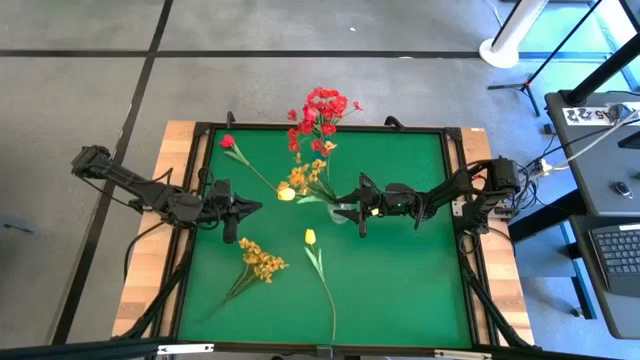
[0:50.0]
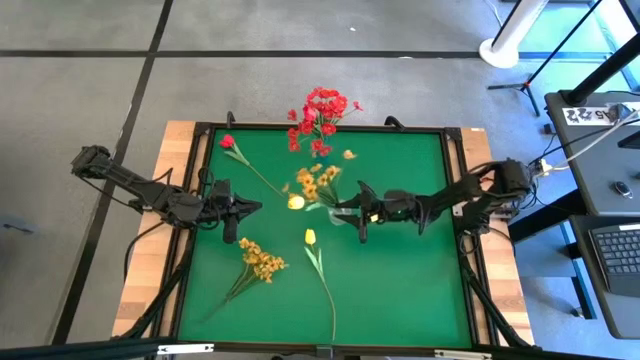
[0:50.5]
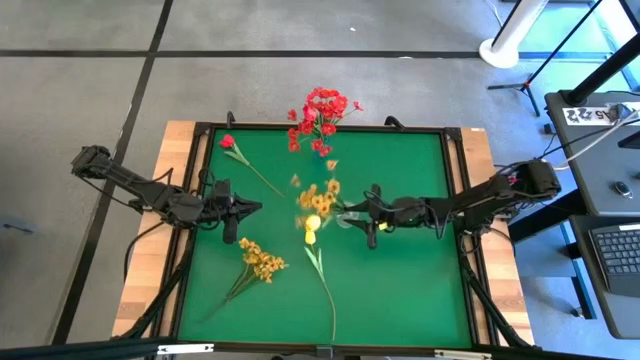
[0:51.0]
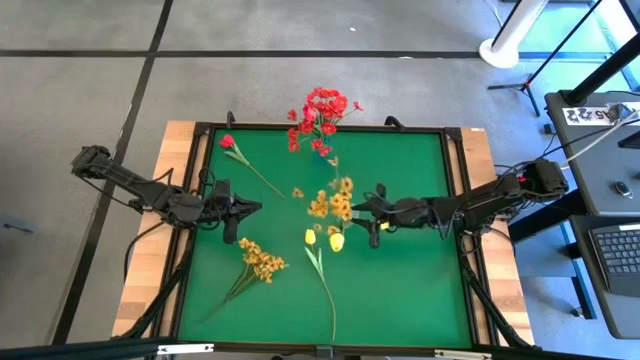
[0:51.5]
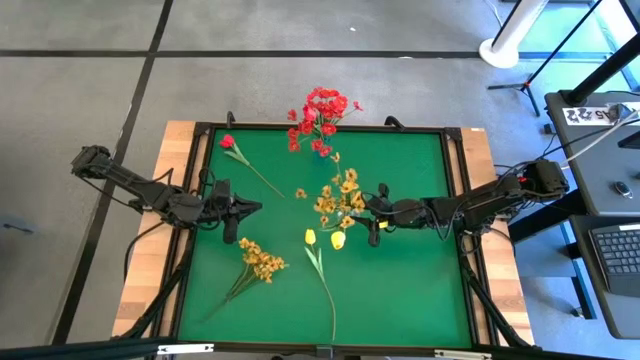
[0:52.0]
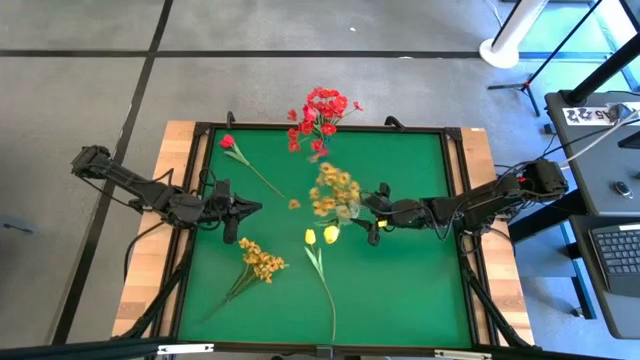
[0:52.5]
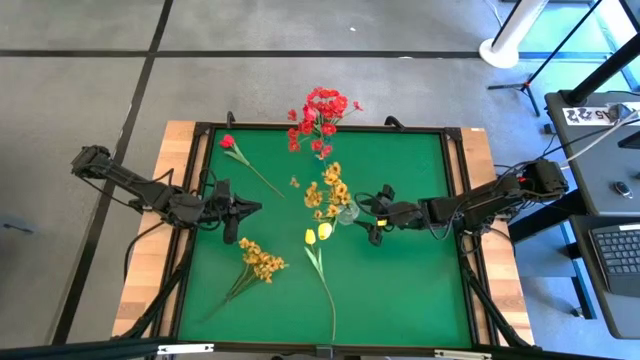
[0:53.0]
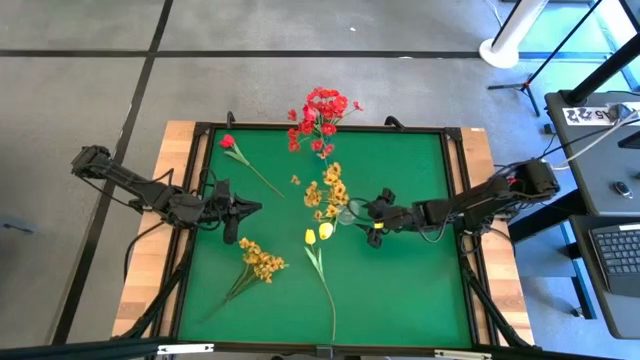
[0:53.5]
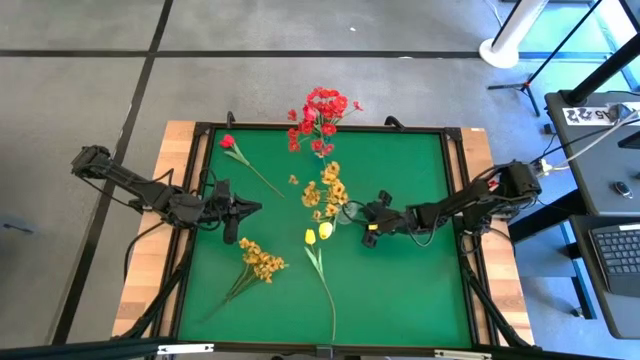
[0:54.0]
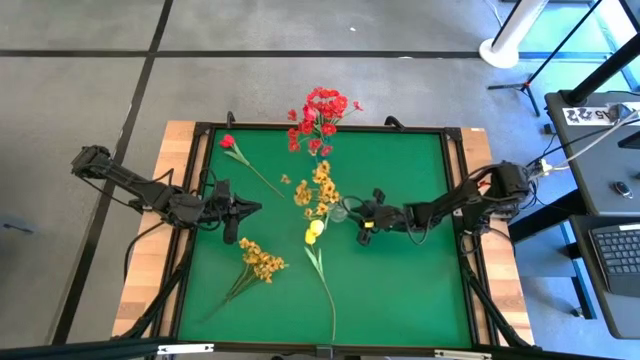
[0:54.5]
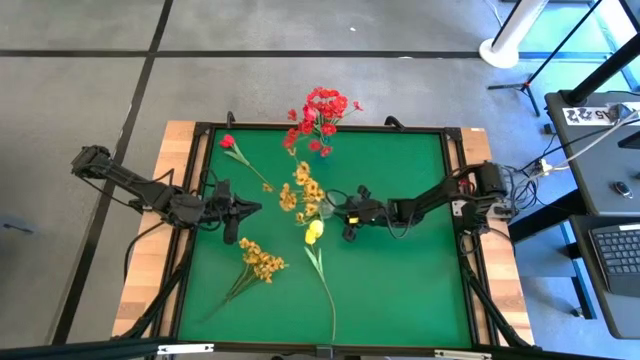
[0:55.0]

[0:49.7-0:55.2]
Task: Sort flowers into vase by color
Adjust the transparent vase

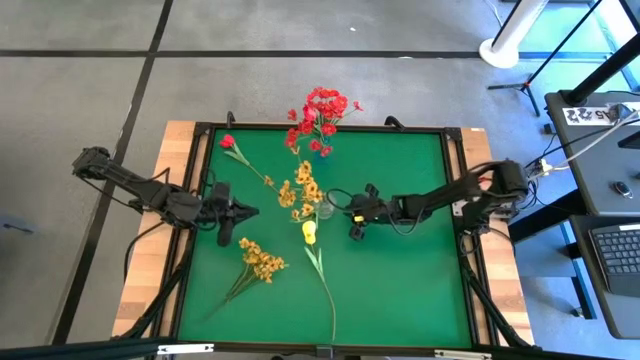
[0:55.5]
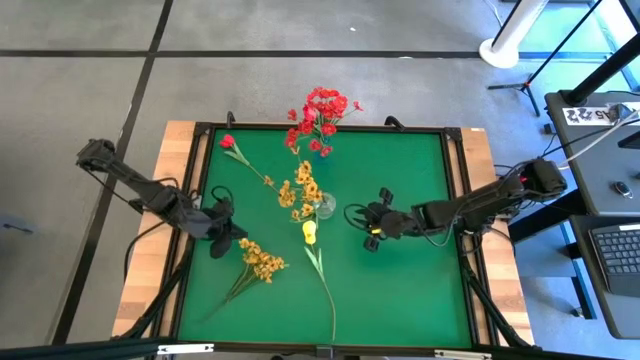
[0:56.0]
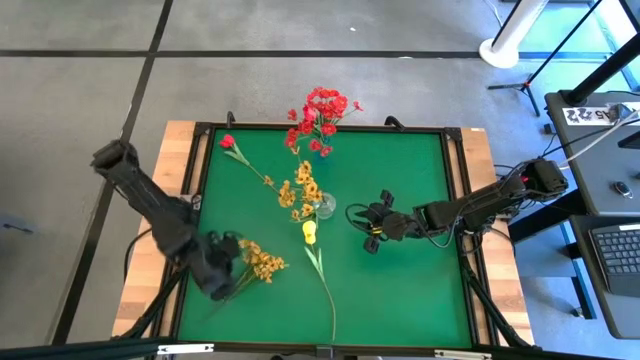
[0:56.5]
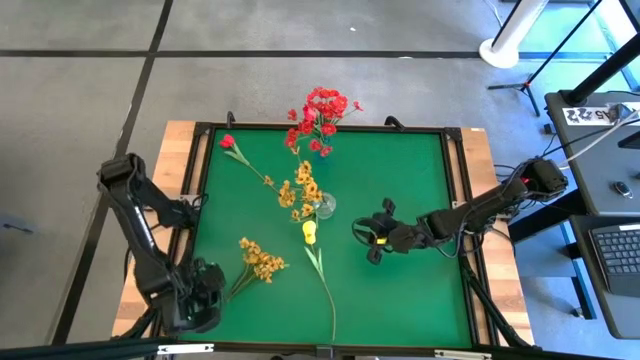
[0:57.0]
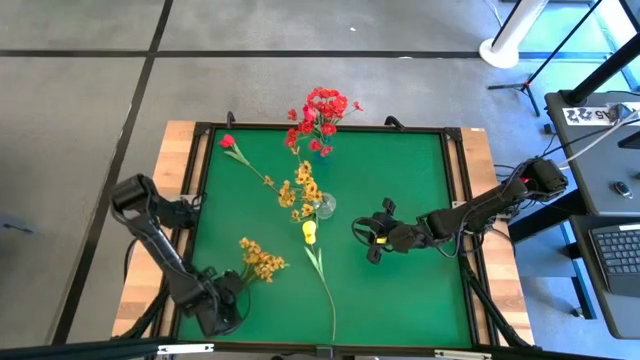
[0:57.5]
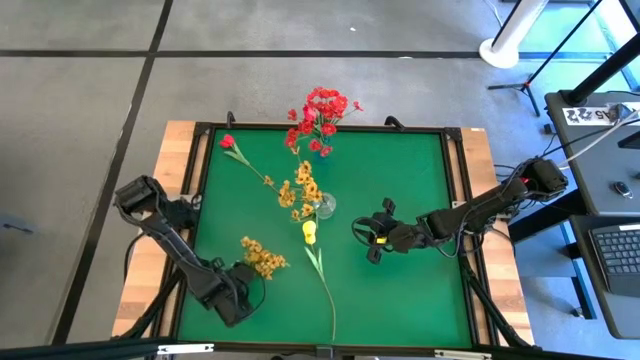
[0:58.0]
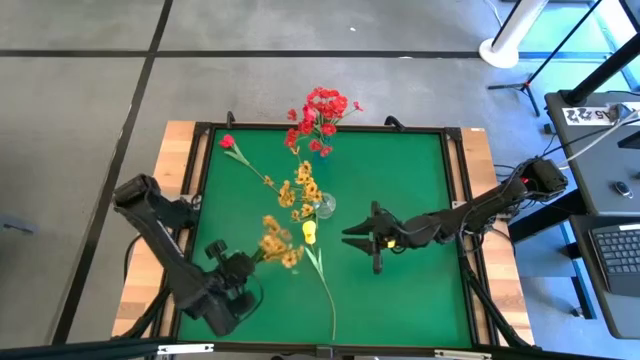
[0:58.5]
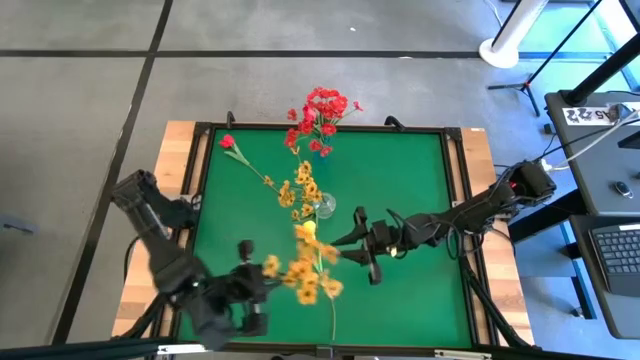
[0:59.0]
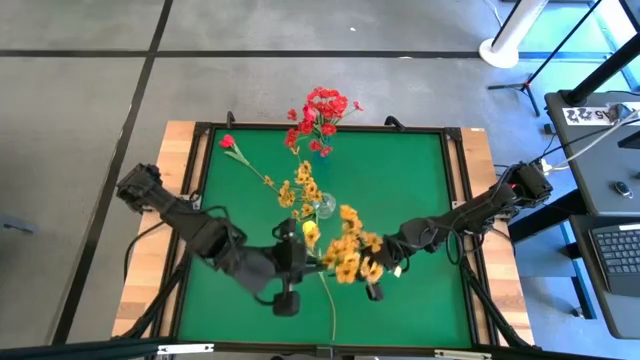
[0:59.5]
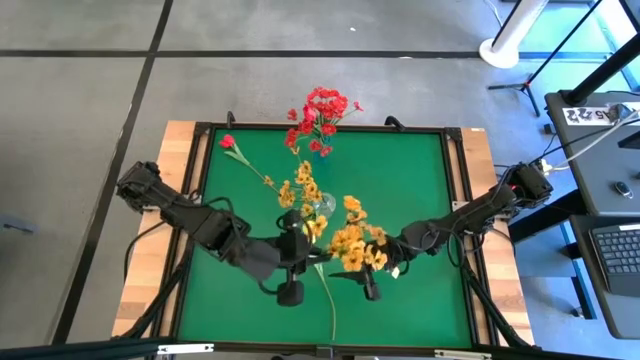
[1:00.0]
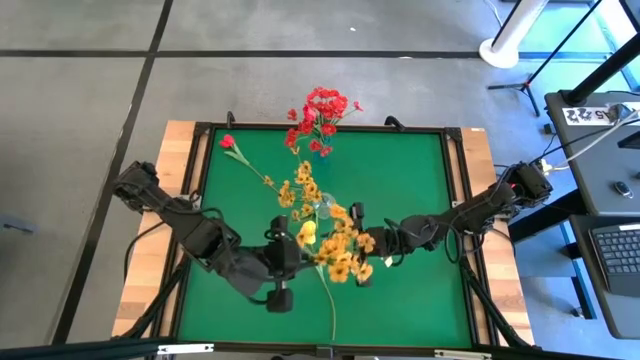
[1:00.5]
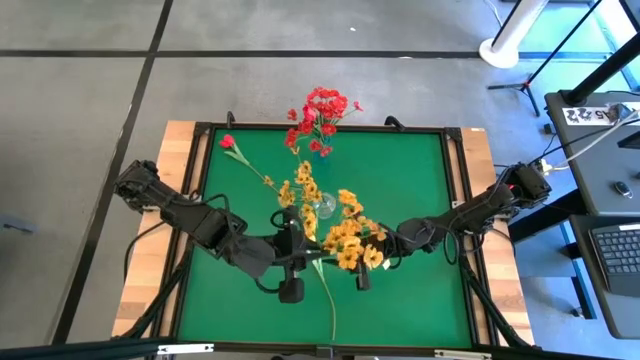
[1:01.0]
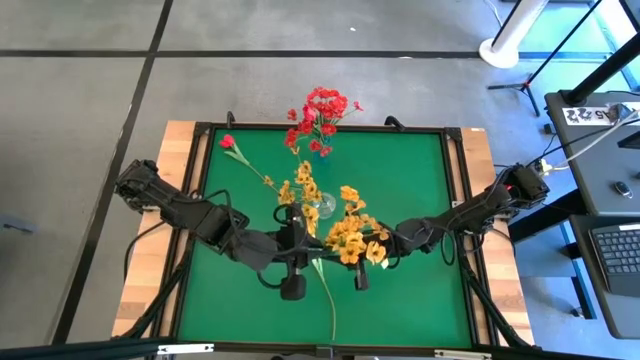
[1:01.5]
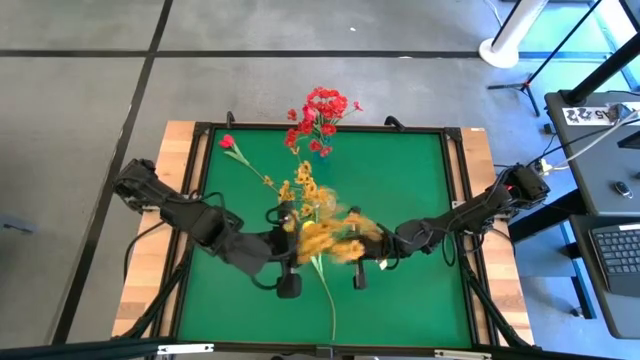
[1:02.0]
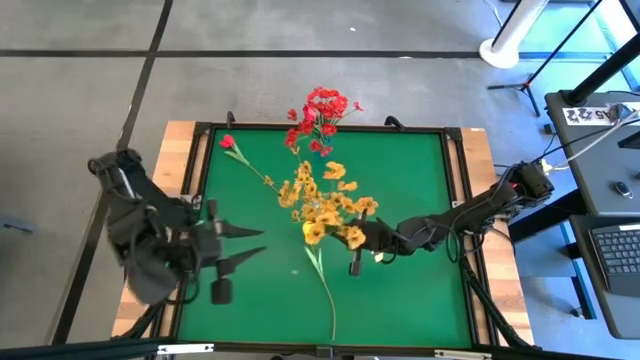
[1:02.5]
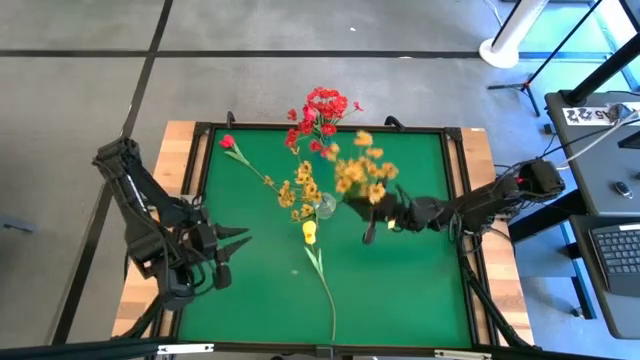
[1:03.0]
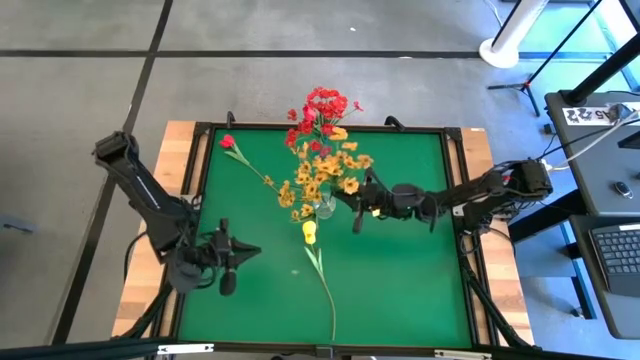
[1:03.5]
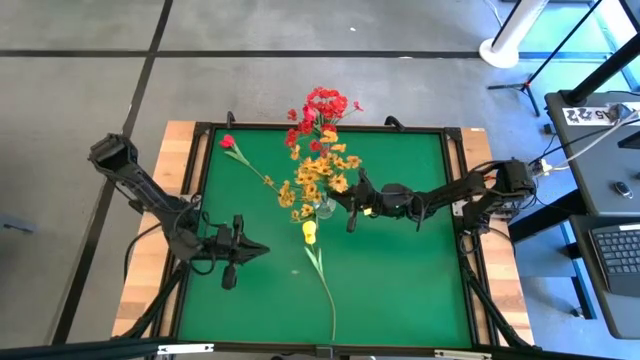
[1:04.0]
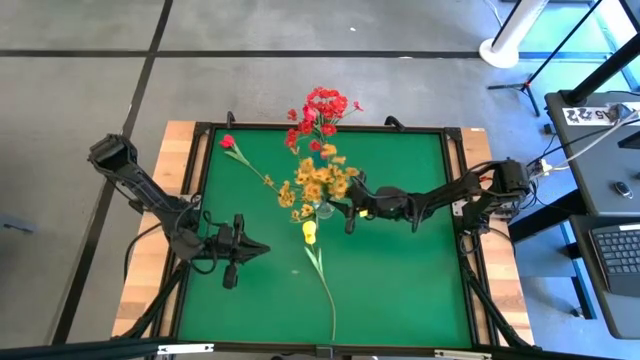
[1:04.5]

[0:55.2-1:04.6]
Put the yellow flowers into the transparent vase

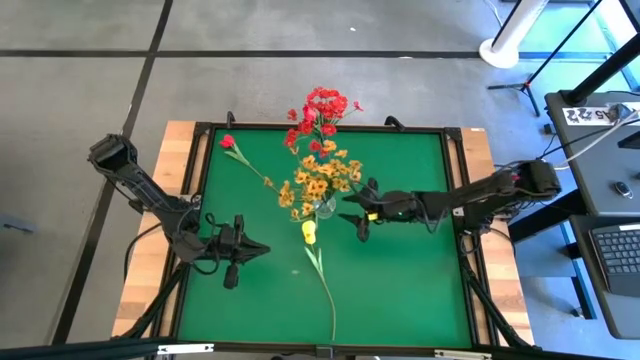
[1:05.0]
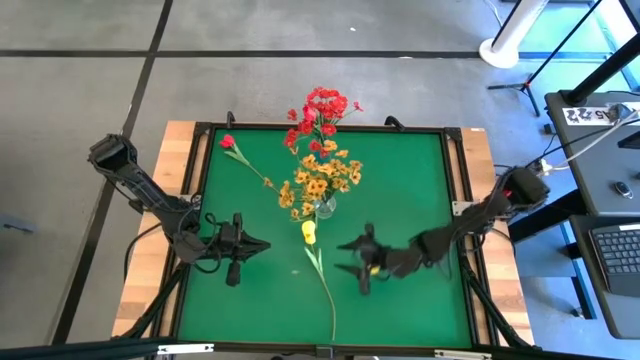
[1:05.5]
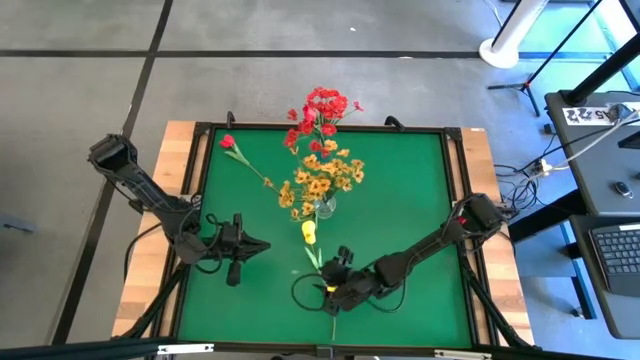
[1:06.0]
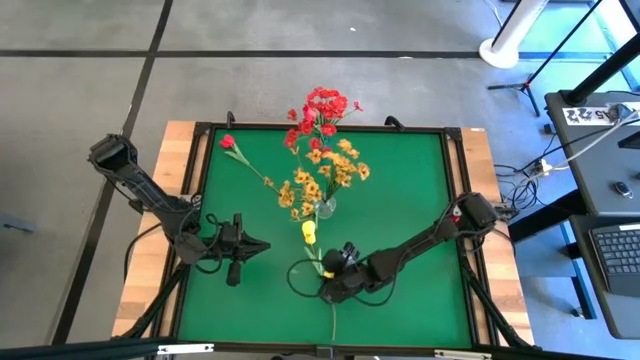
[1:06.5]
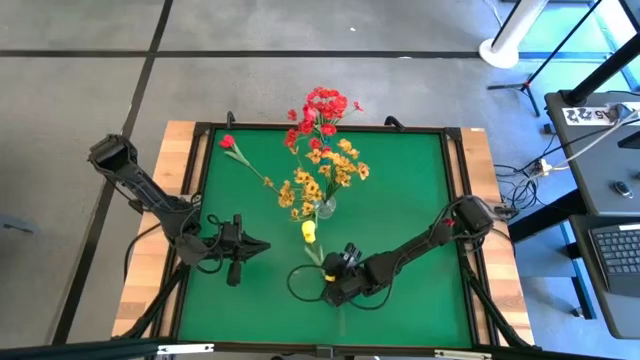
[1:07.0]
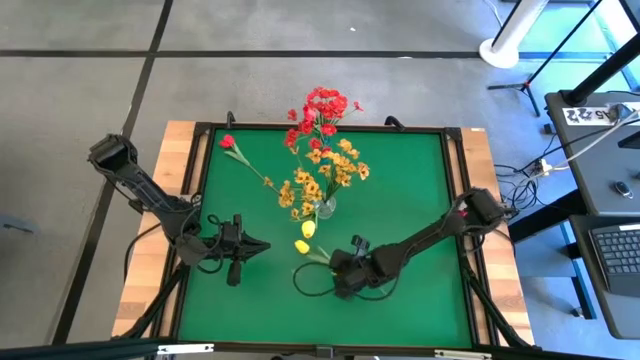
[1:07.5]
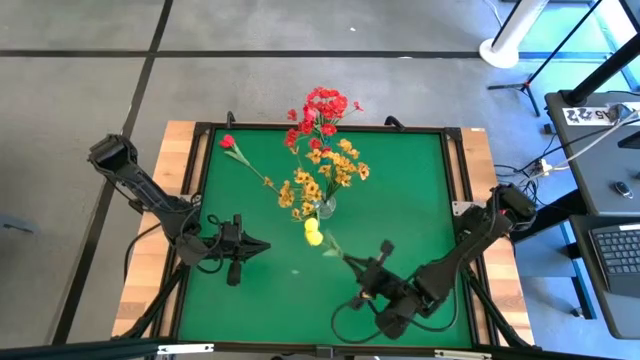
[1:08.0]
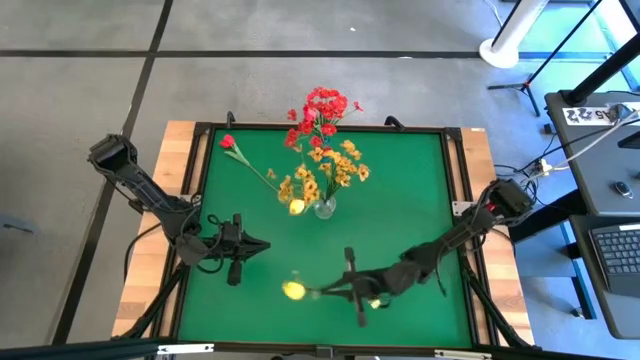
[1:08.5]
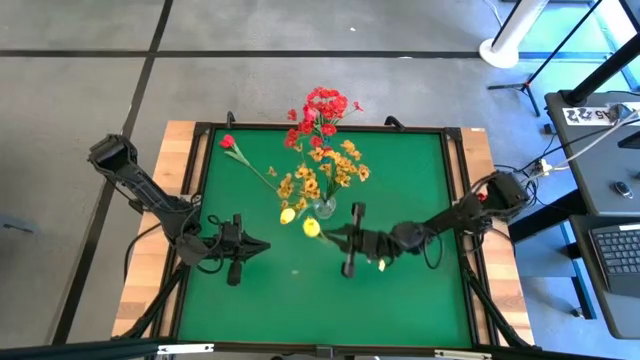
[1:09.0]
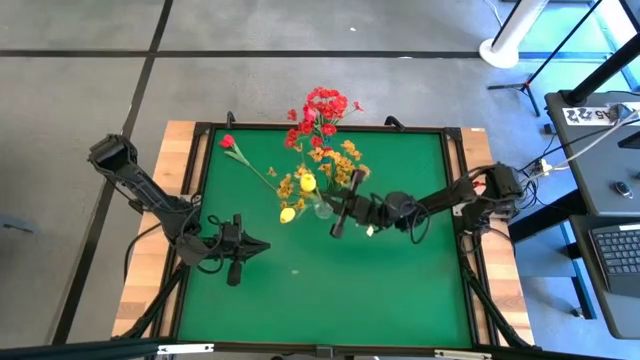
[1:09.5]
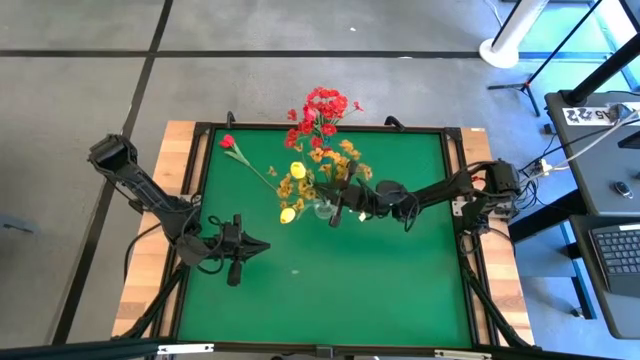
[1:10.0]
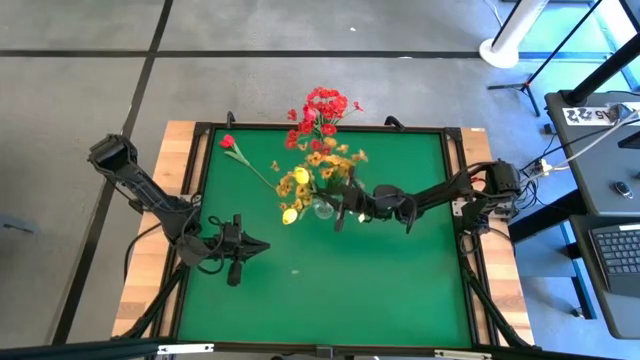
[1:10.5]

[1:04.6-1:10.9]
Put the yellow tulip into the transparent vase
